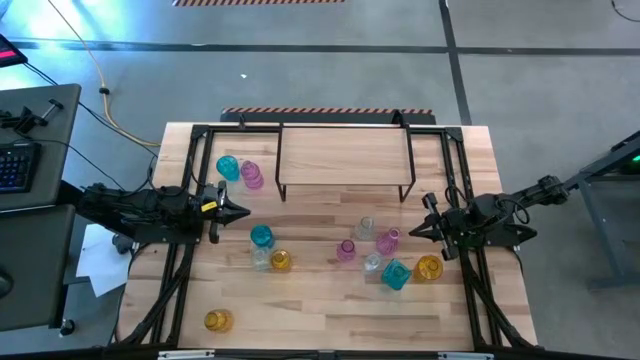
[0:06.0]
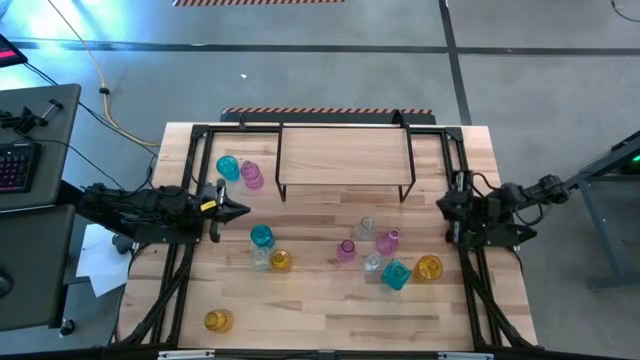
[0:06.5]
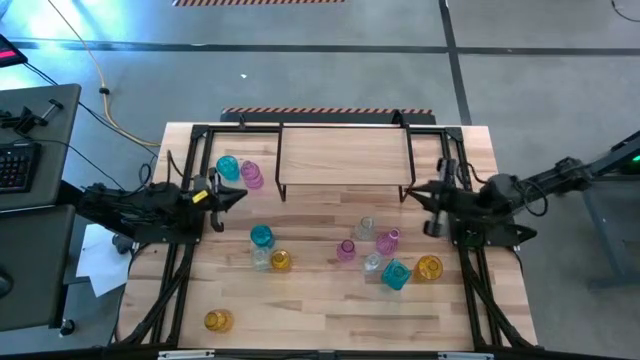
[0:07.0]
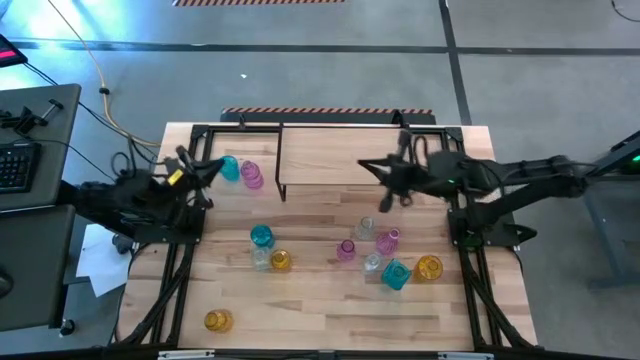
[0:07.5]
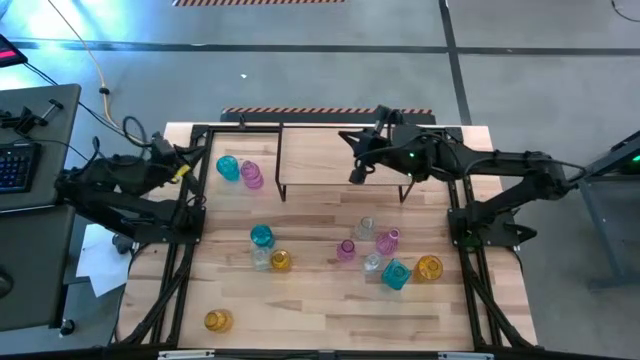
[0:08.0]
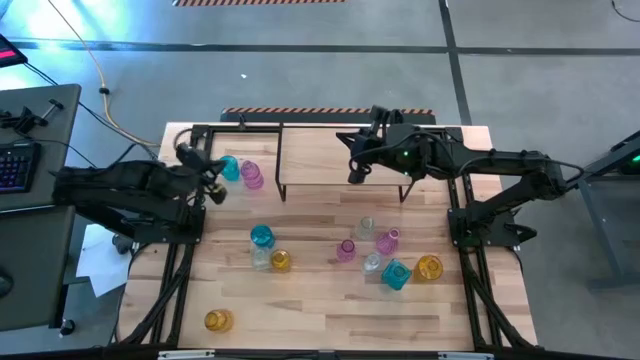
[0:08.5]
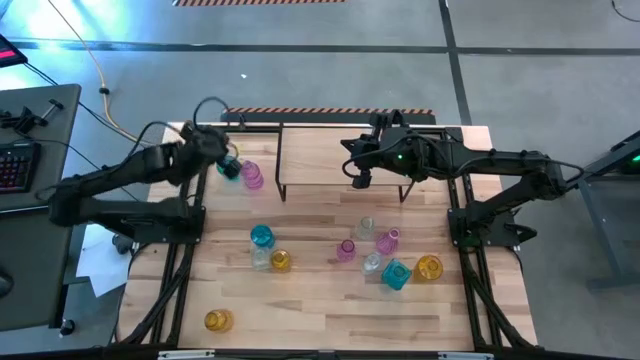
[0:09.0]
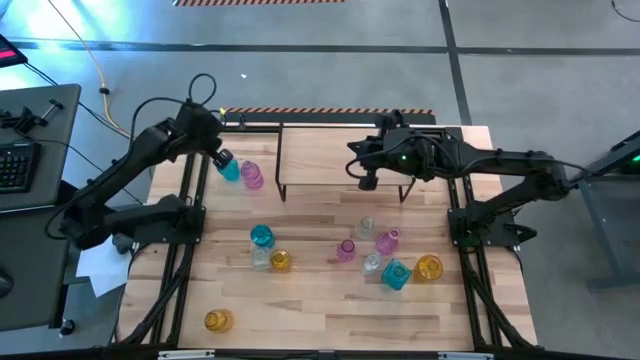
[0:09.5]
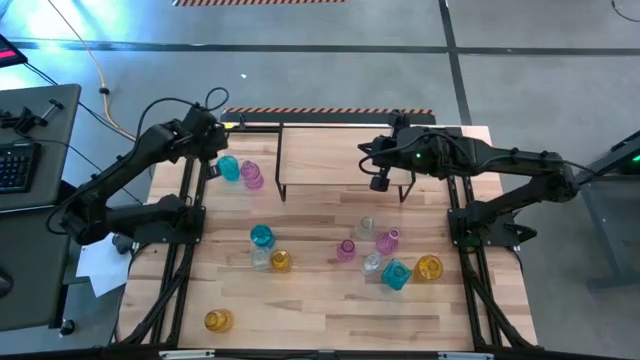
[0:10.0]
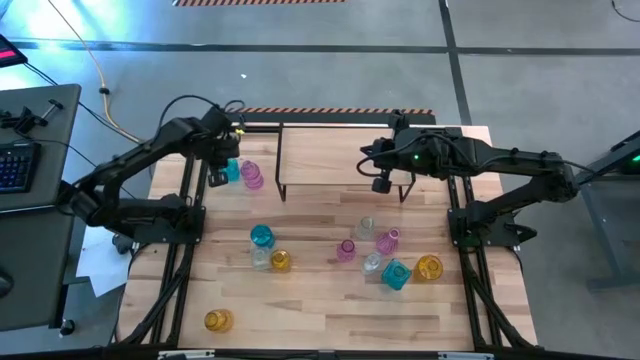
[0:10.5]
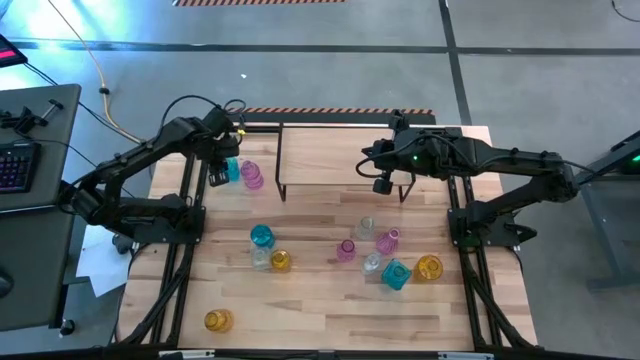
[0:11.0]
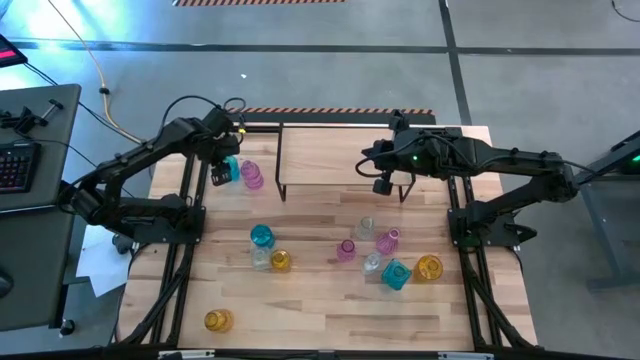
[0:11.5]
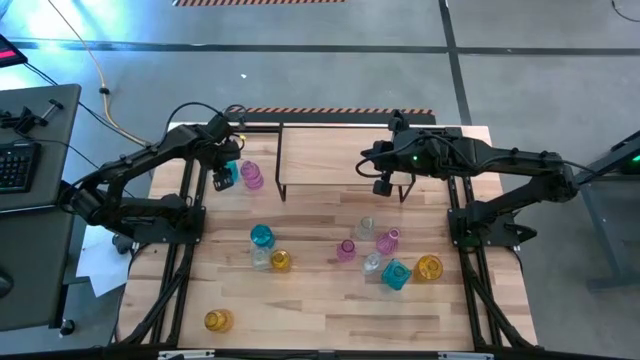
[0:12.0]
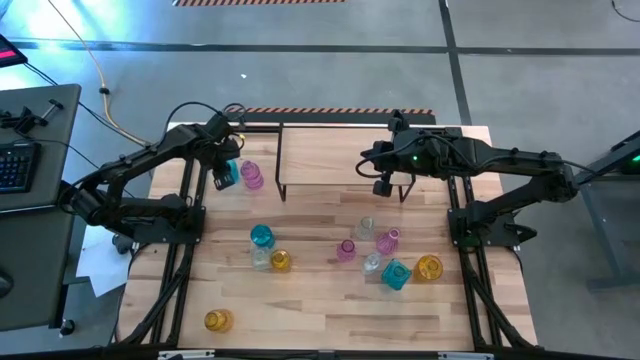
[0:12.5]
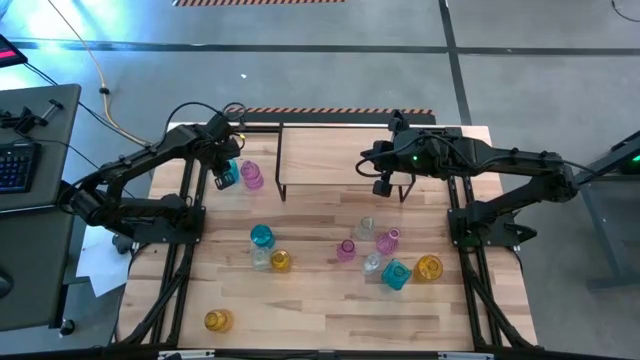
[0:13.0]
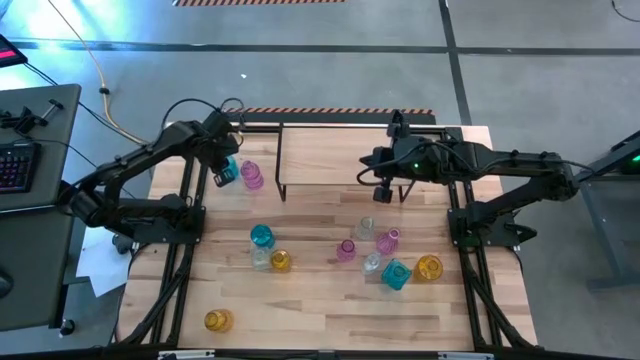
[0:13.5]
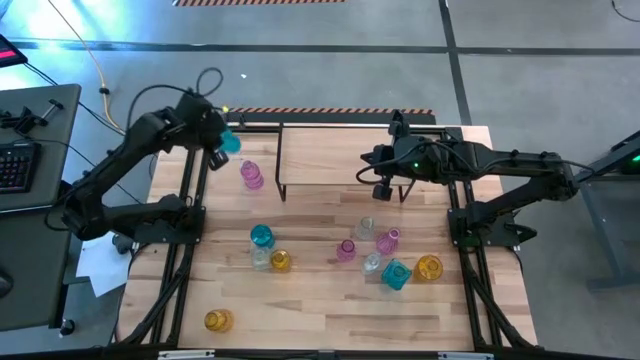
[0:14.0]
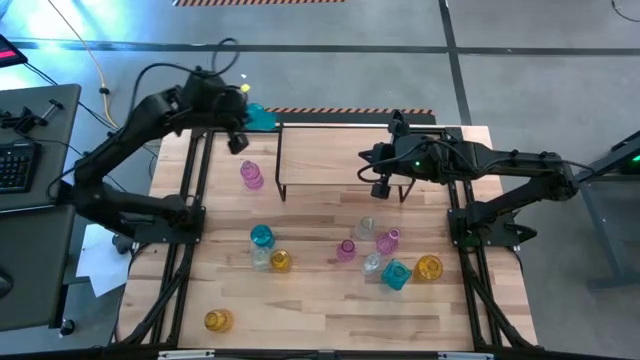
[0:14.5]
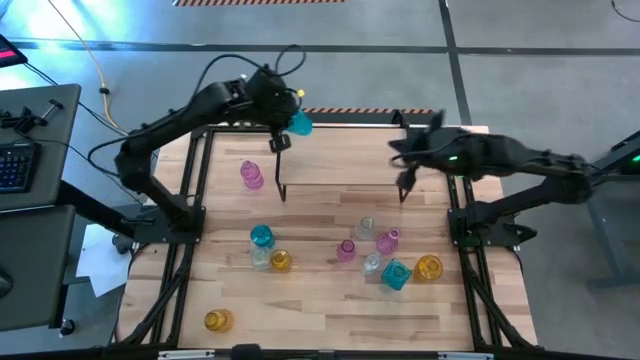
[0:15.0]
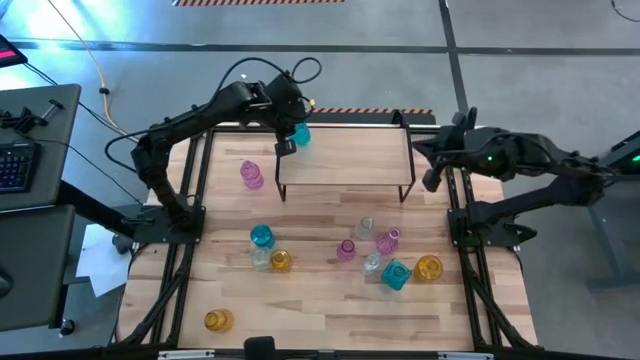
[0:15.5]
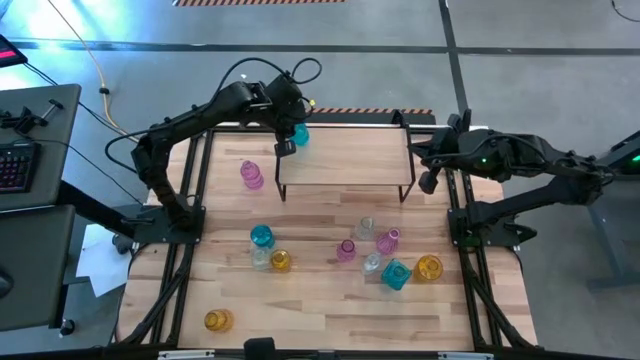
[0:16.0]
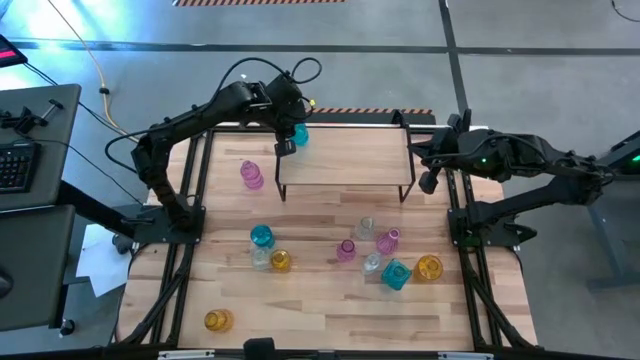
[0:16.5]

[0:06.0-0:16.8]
Task: sort vases onto shelf
Put the top blue vase on the shelf

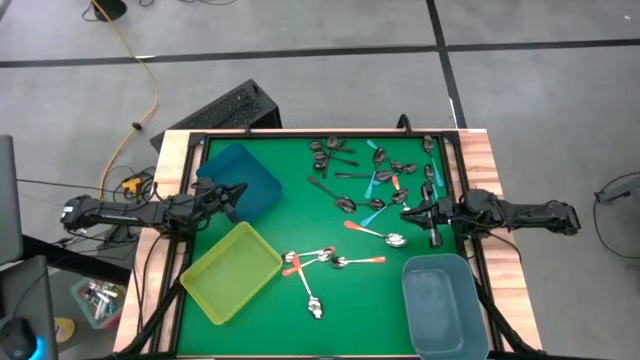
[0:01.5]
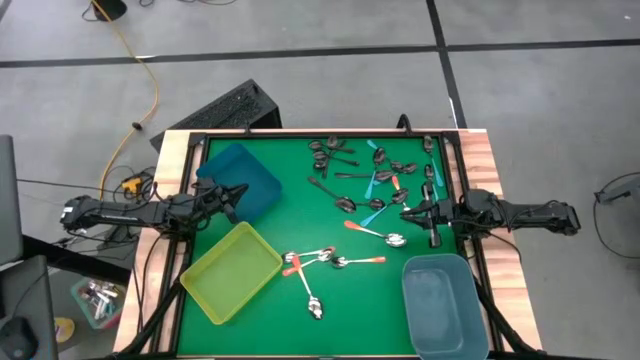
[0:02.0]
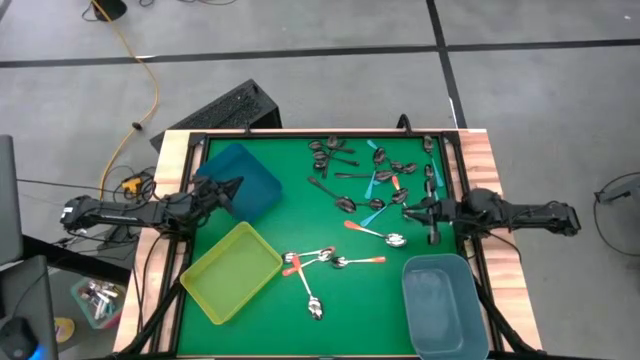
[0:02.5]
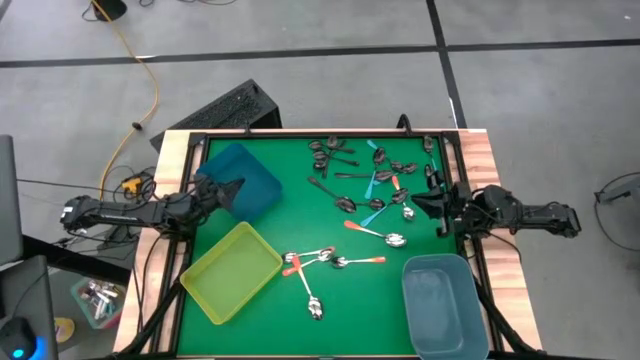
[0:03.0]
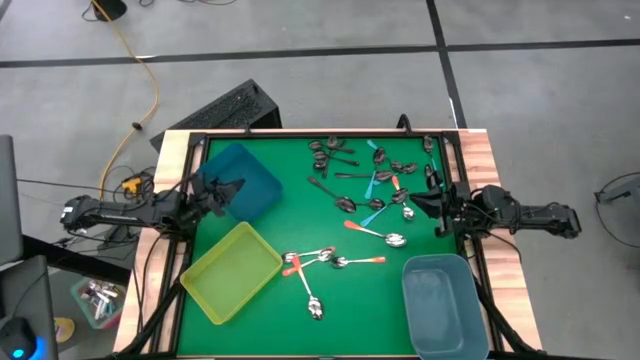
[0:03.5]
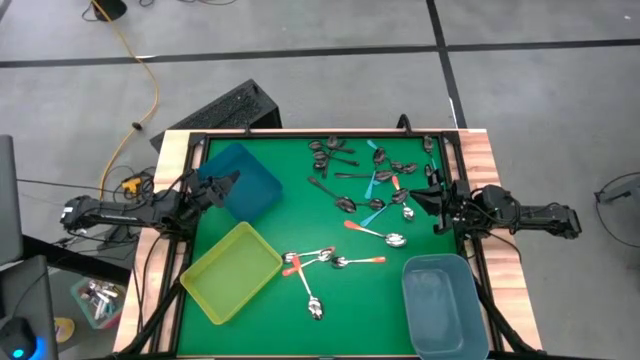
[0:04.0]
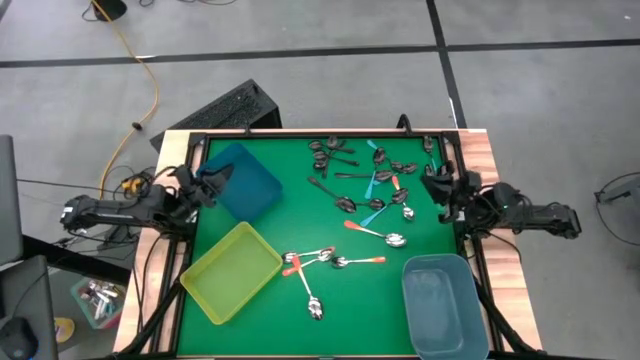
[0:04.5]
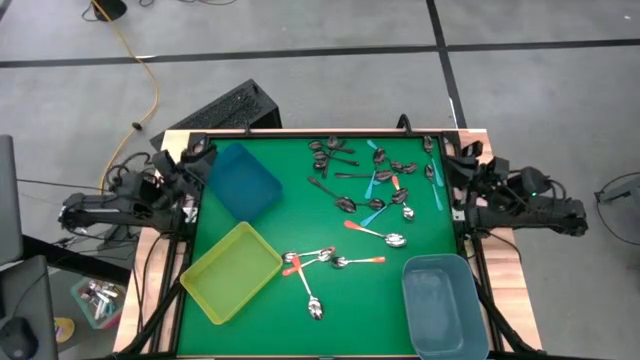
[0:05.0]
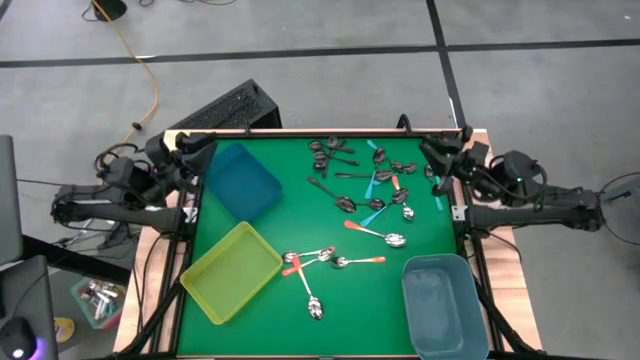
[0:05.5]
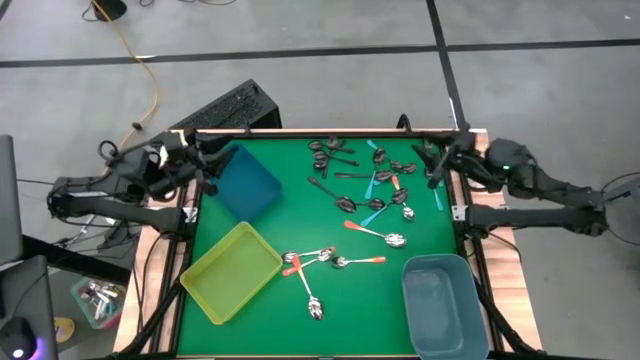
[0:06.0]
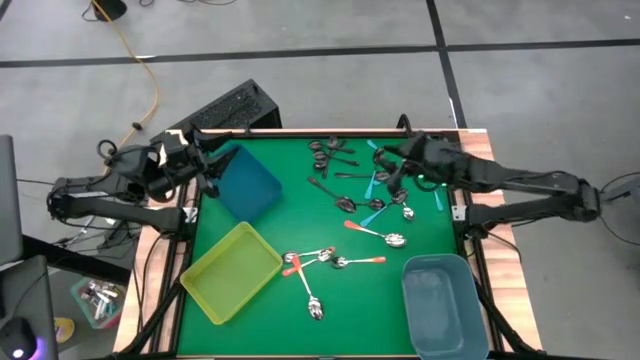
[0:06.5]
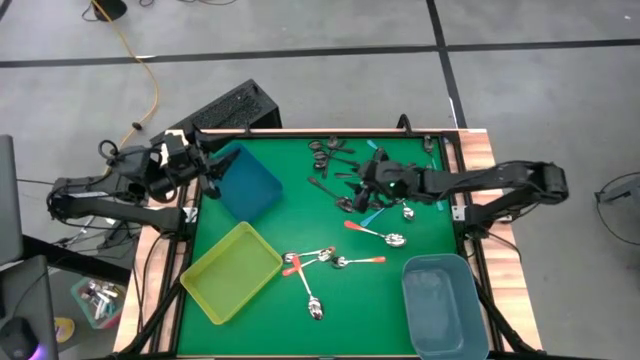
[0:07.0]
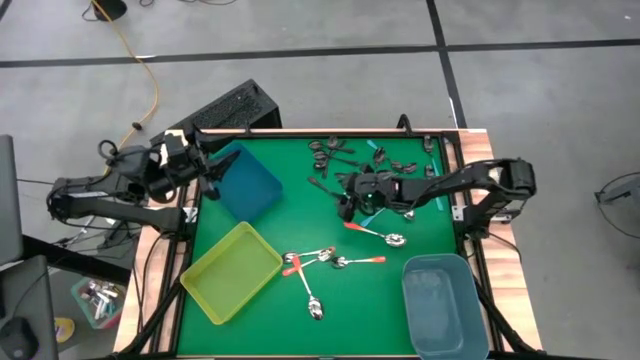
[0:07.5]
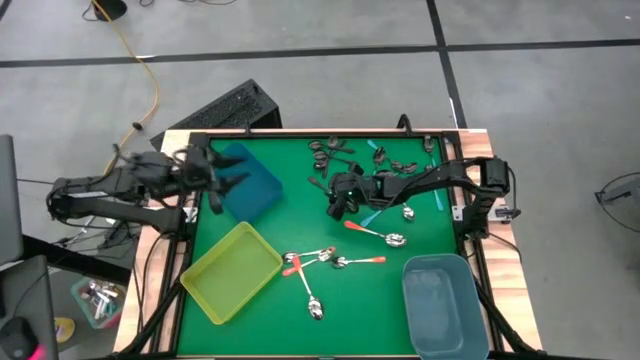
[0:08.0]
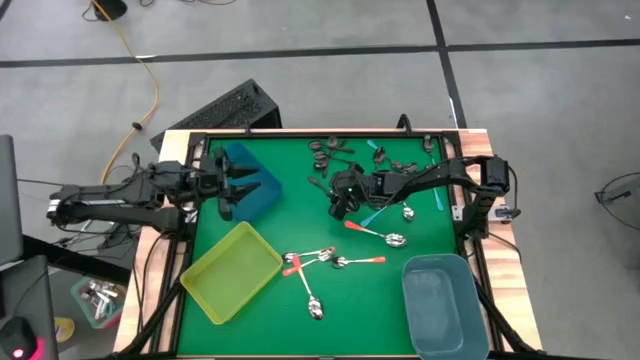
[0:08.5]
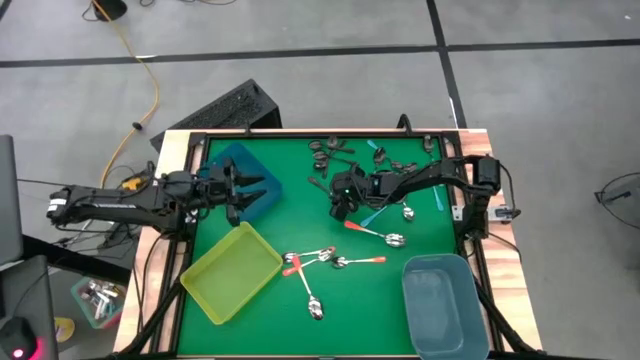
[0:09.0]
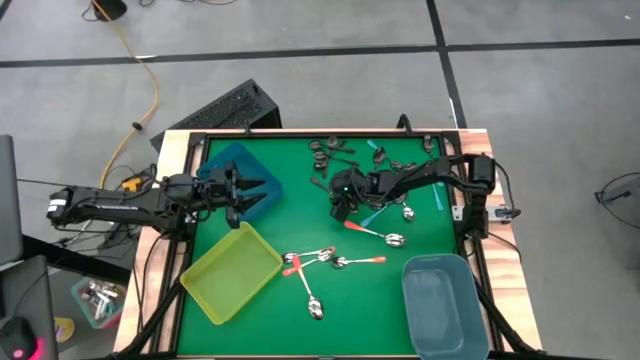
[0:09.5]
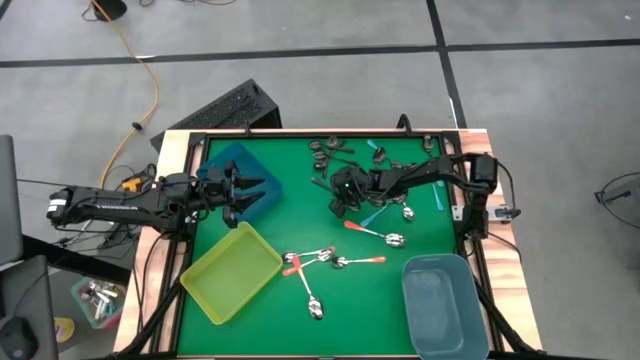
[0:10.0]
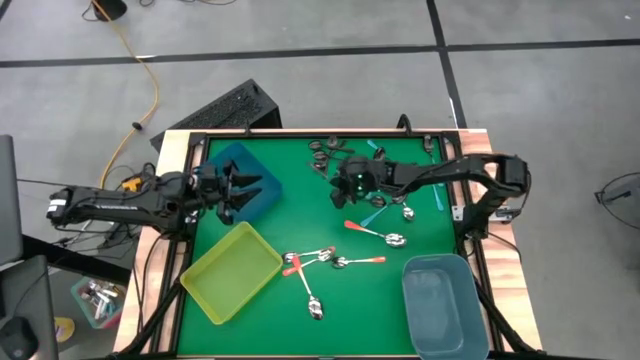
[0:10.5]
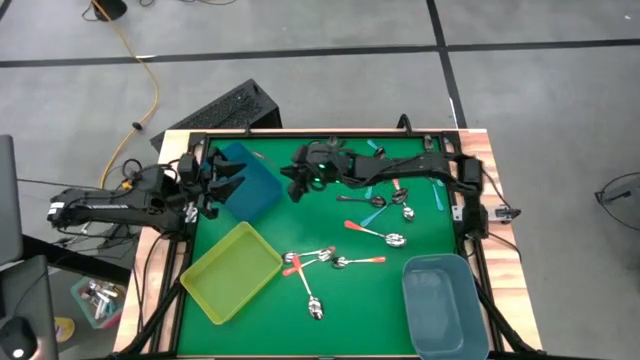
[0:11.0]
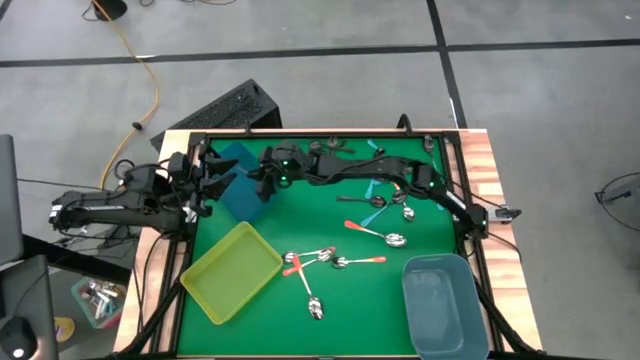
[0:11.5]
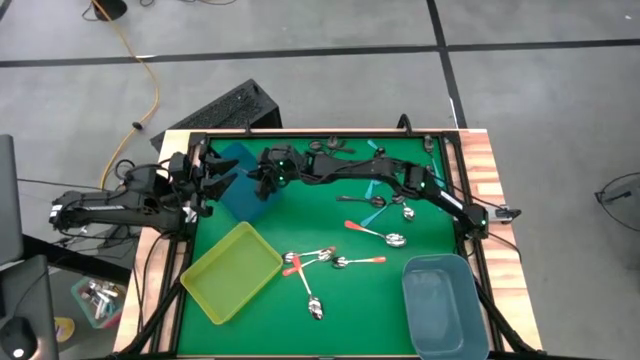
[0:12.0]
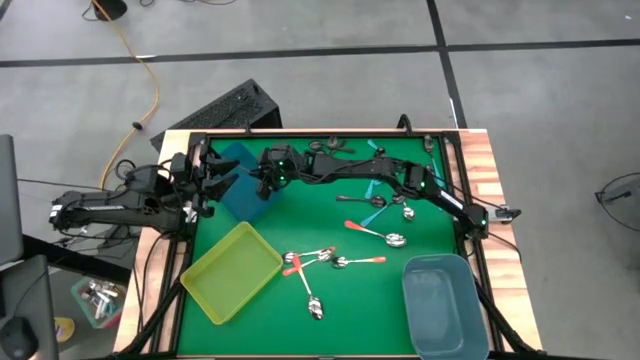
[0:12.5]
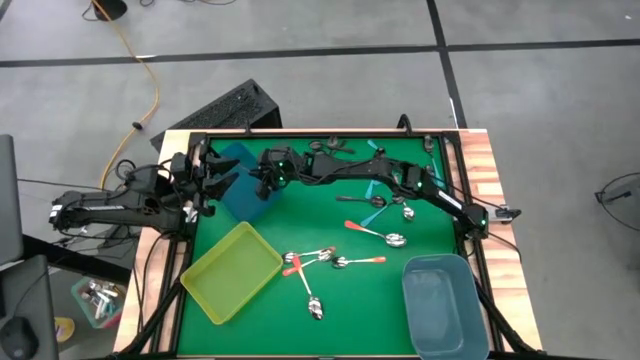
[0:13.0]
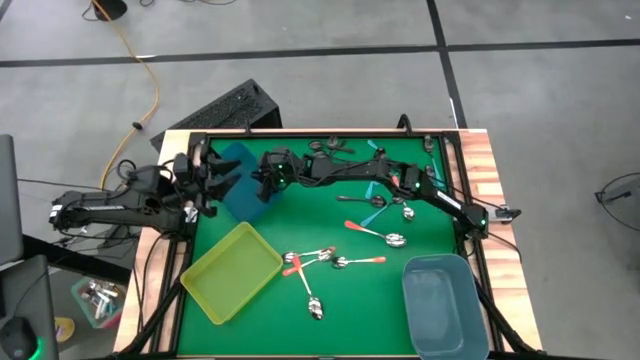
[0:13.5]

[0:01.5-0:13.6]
Task: Sort silverware by color (type)
Put the black spoon into the dark blue bin
